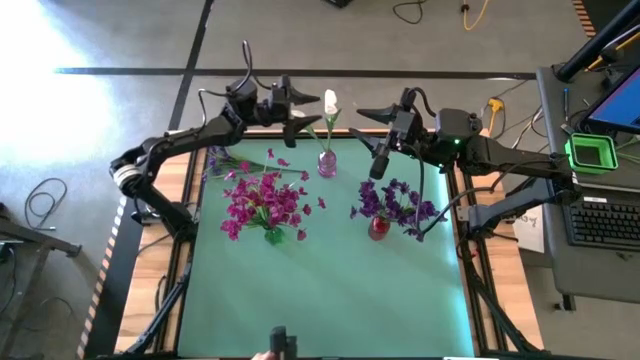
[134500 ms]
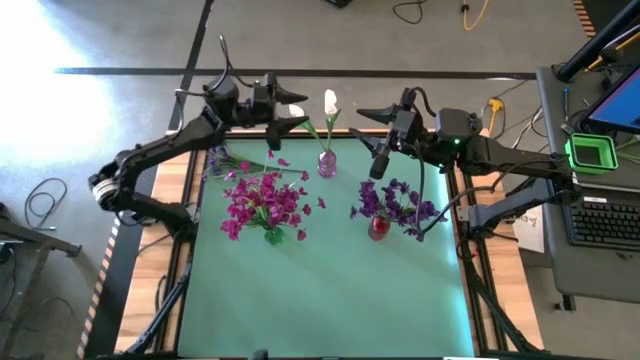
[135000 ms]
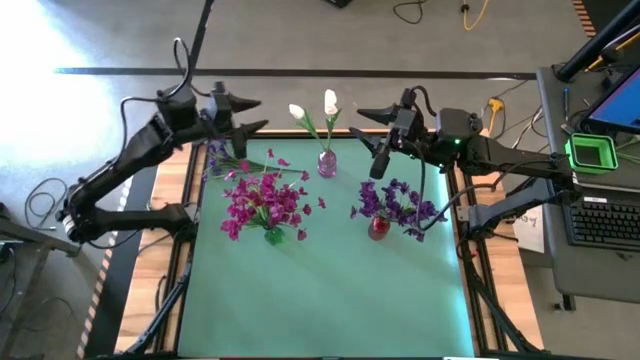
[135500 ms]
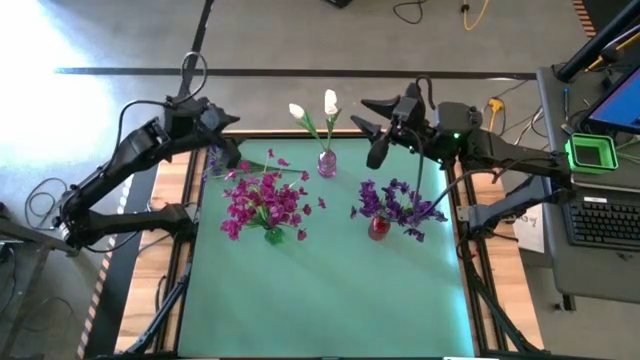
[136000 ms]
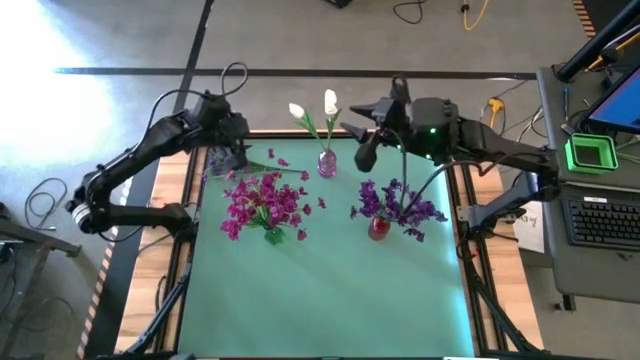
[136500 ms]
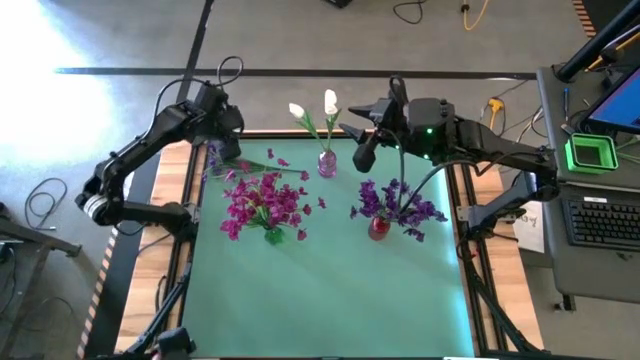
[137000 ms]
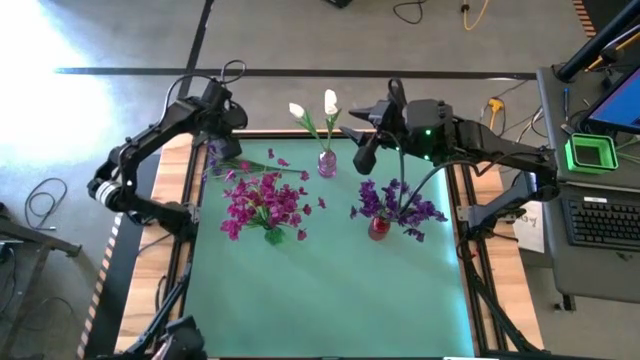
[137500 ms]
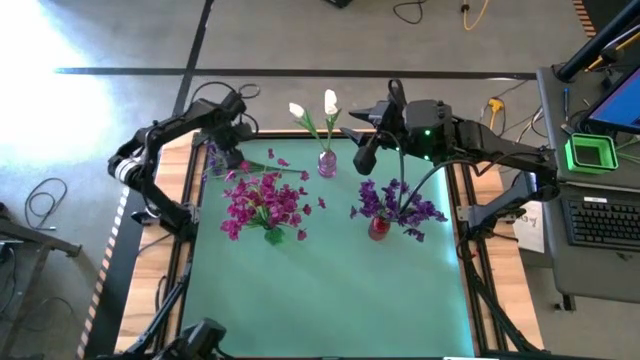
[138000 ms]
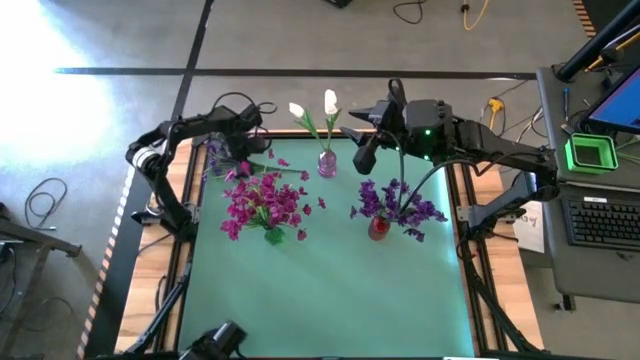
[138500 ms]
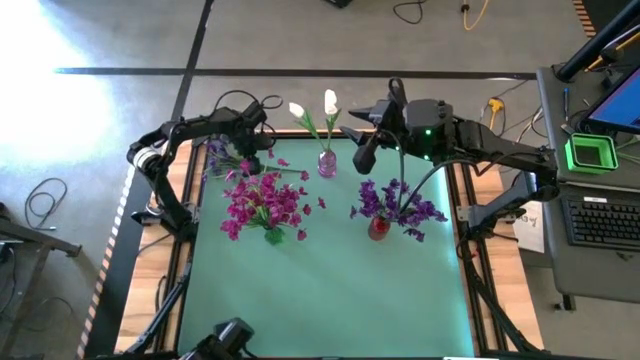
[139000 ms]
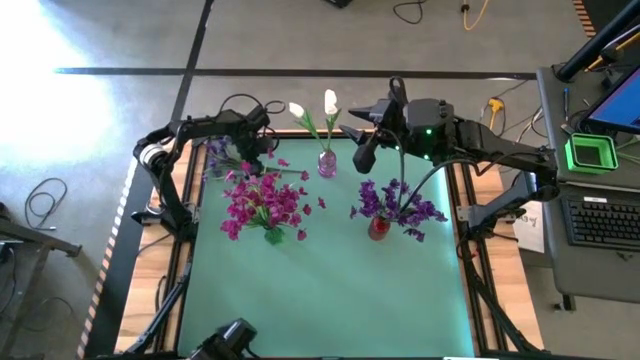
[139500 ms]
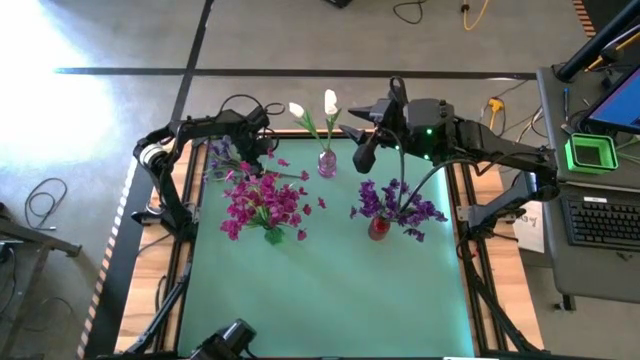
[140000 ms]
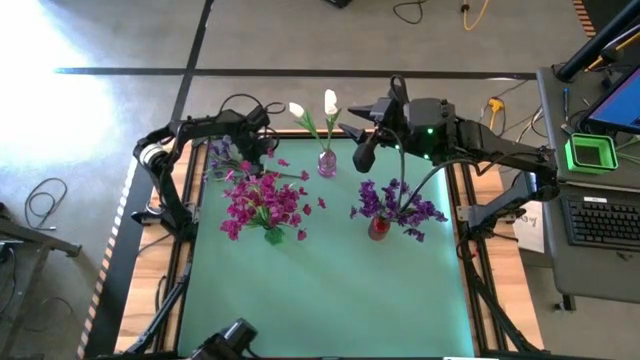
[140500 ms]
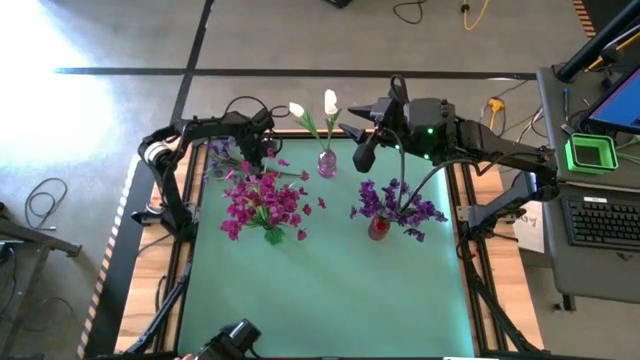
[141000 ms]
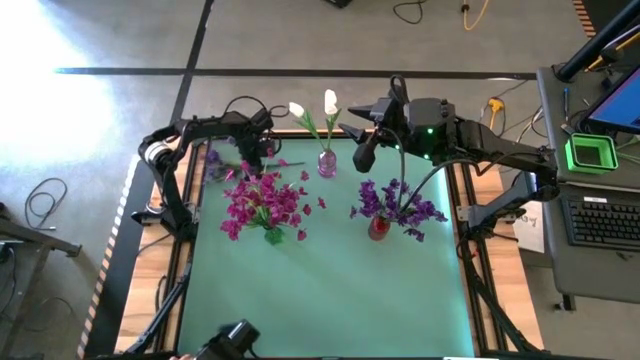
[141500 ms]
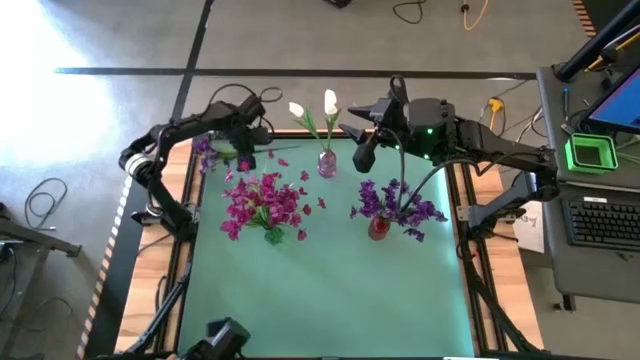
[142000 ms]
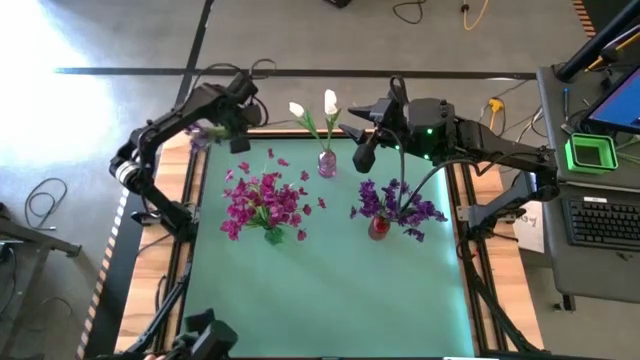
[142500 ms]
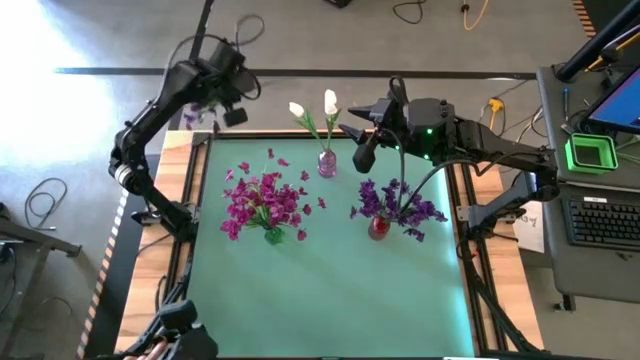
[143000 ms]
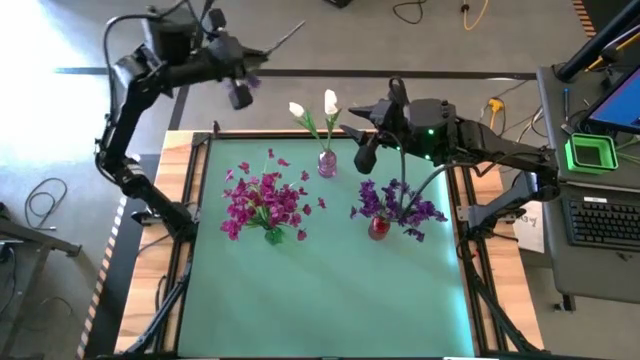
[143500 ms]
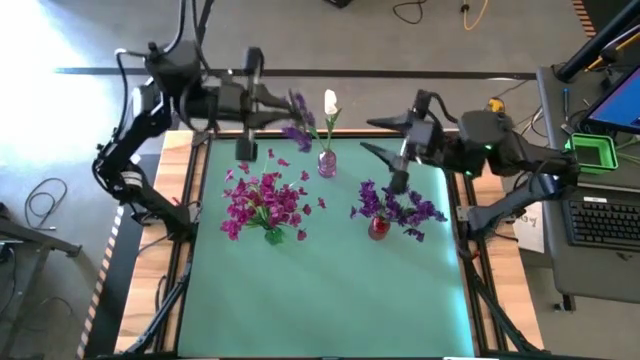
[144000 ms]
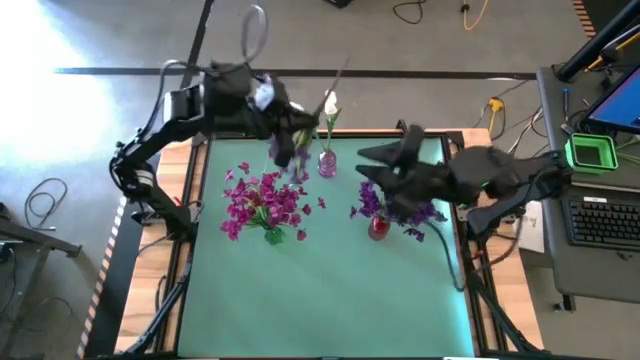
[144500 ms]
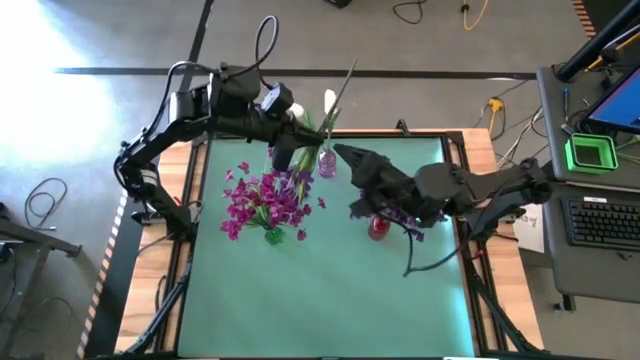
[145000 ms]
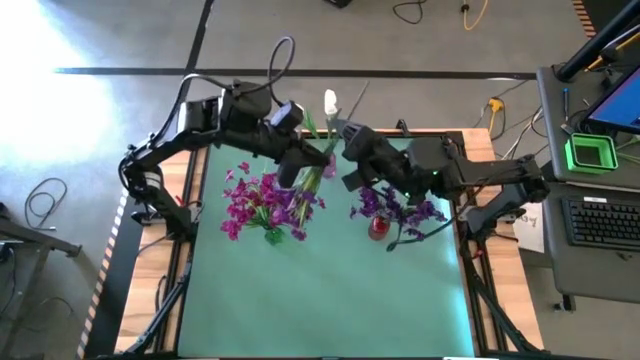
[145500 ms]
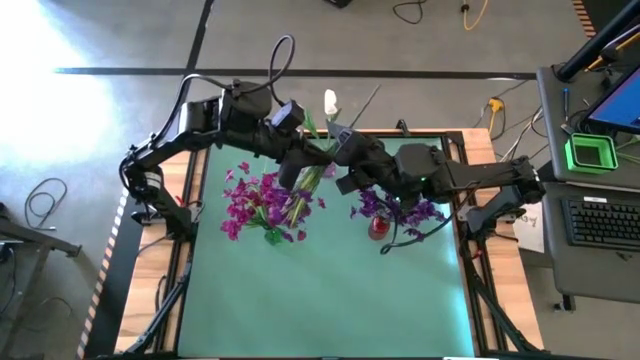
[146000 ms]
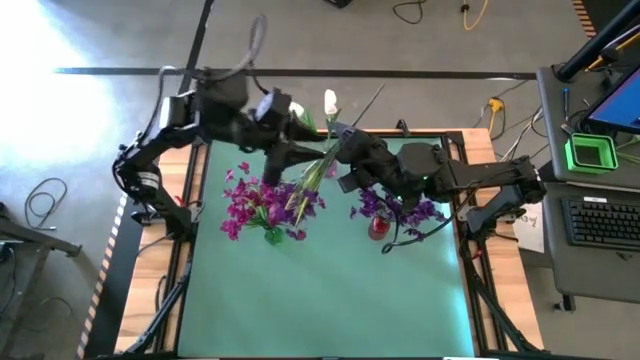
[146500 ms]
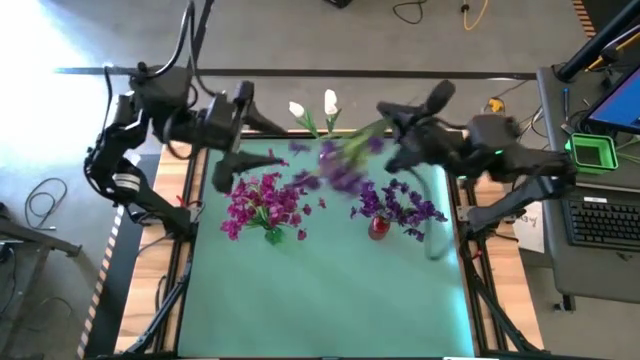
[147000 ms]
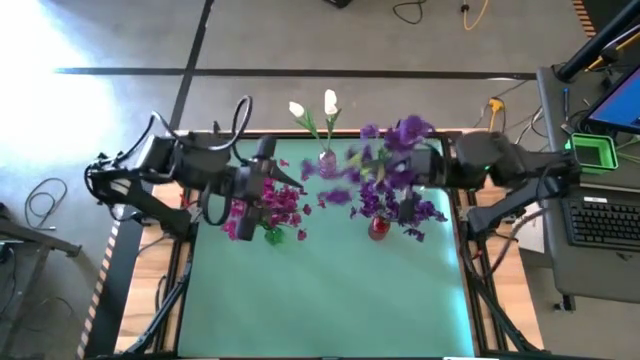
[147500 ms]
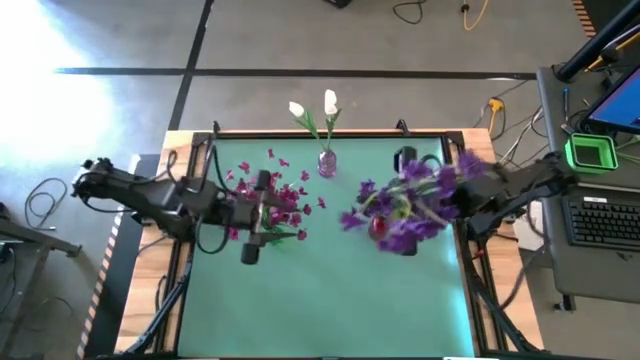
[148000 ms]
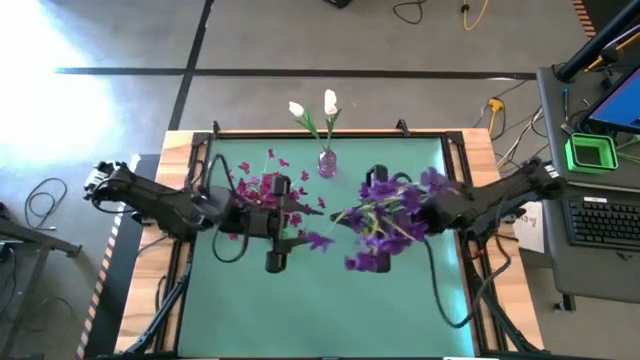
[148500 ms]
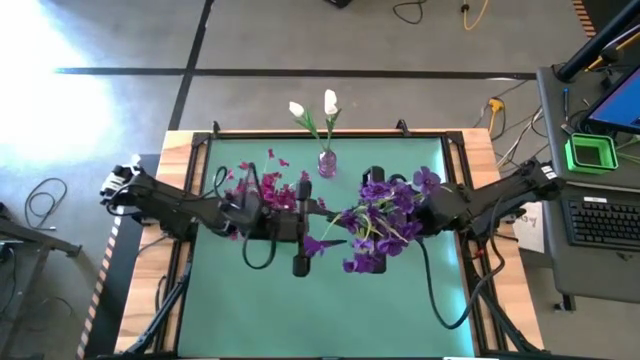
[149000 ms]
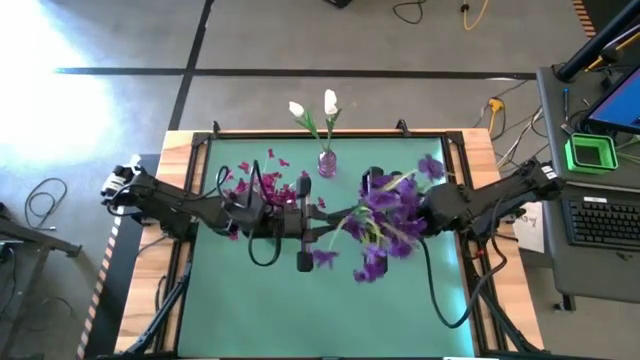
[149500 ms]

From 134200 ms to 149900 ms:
Task: Sort flowers into vase by color
Put the violet flowers into the red flower vase

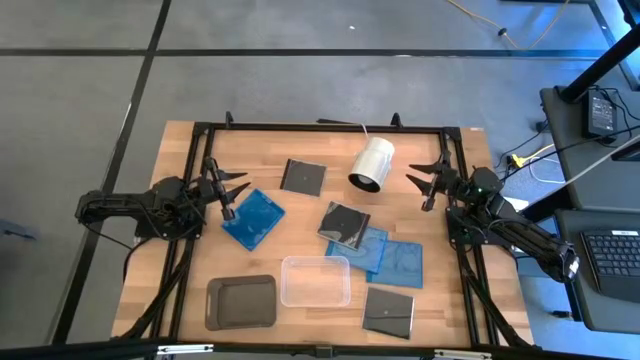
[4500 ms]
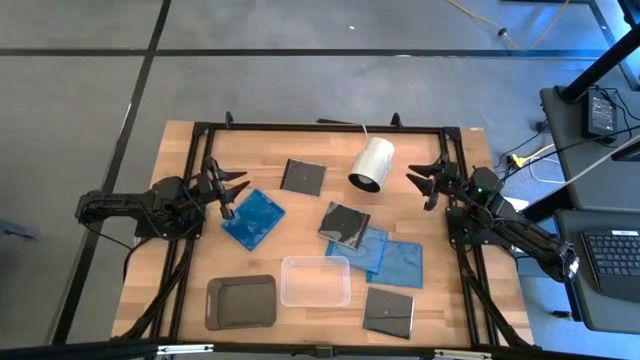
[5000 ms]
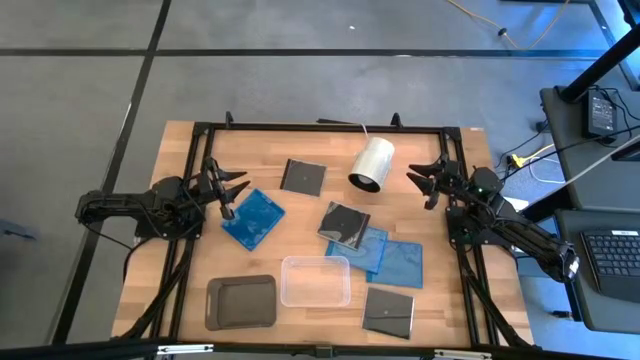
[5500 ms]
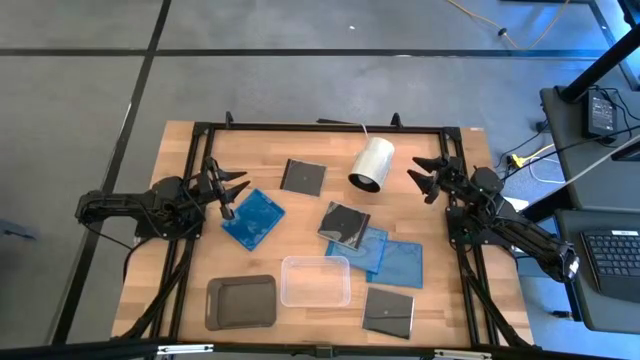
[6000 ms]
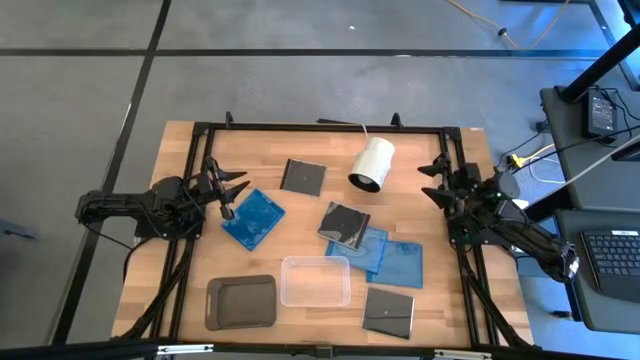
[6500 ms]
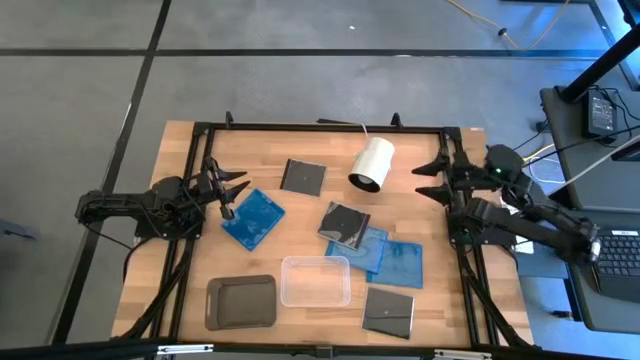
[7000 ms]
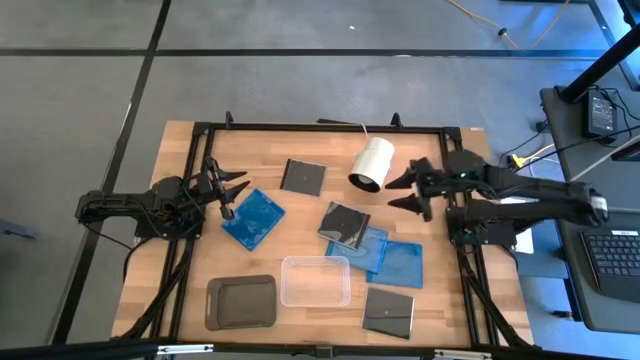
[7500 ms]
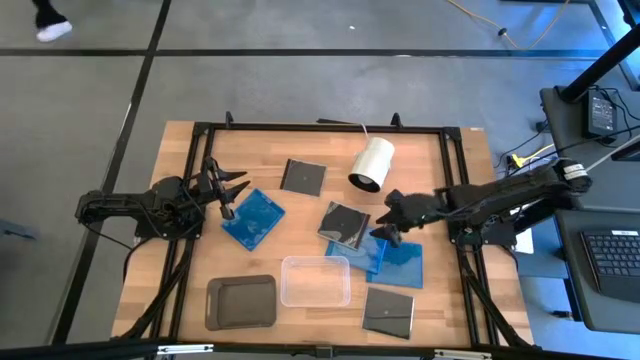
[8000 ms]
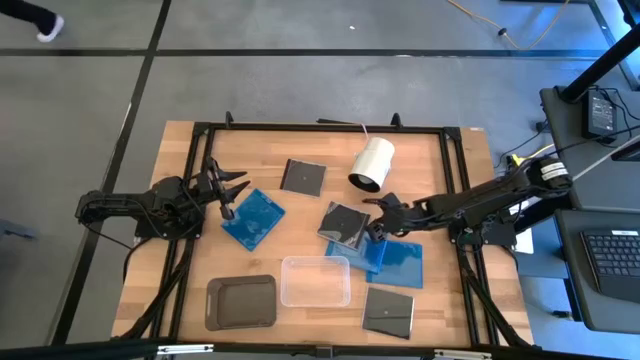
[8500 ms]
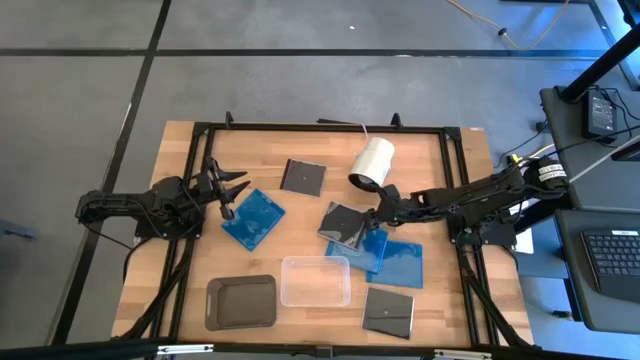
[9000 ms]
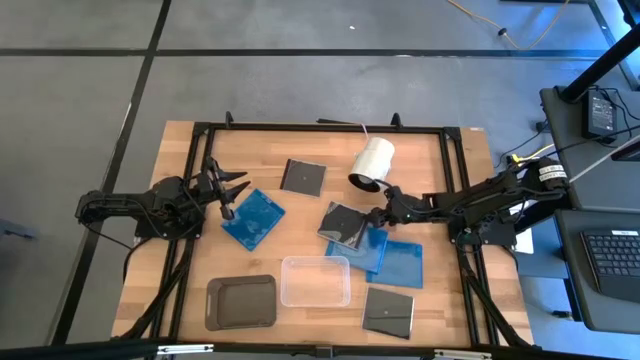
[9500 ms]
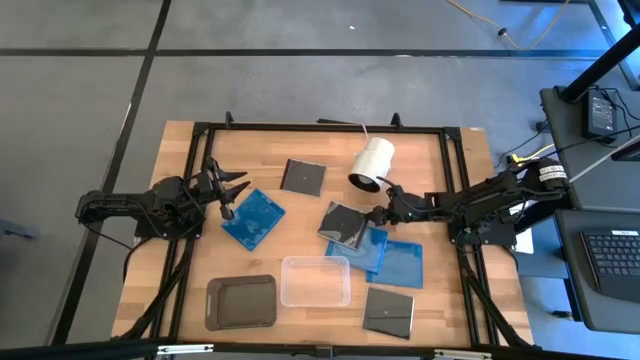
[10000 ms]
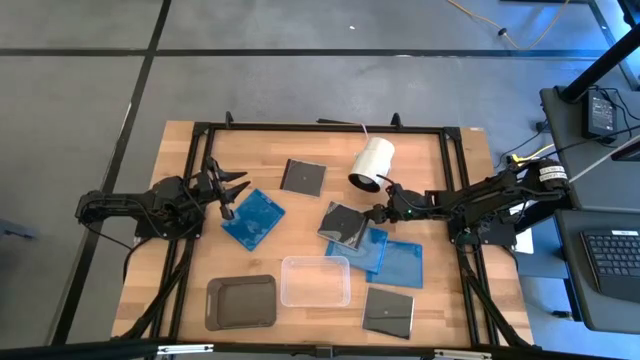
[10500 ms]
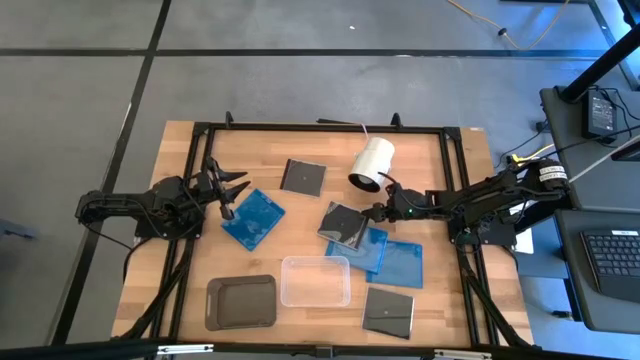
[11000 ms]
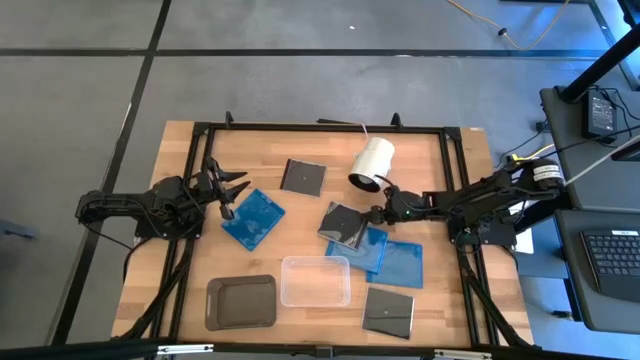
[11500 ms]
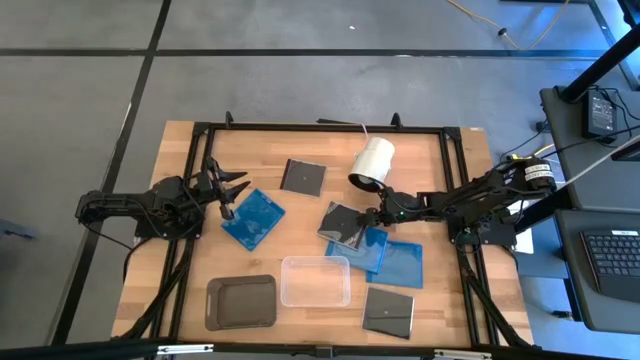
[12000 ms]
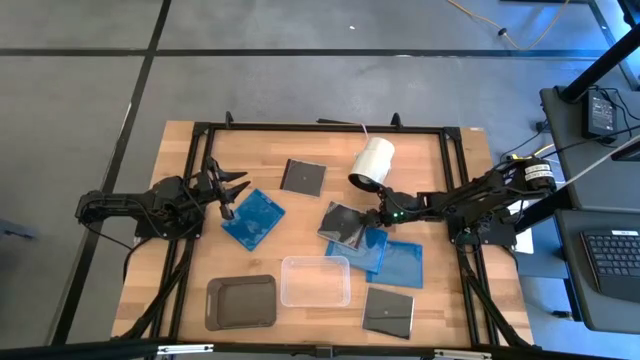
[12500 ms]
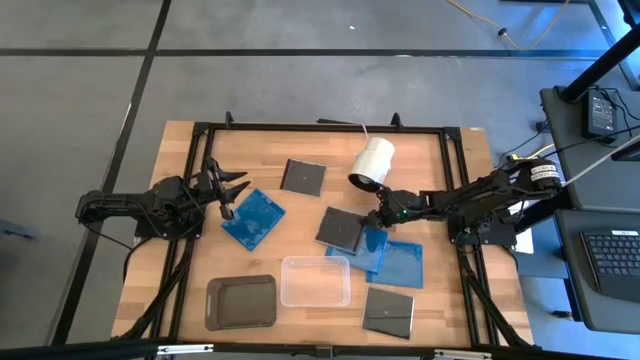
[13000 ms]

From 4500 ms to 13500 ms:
Task: Pick & place jewel cases by type
Put the middle black CD case into the transparent bin
